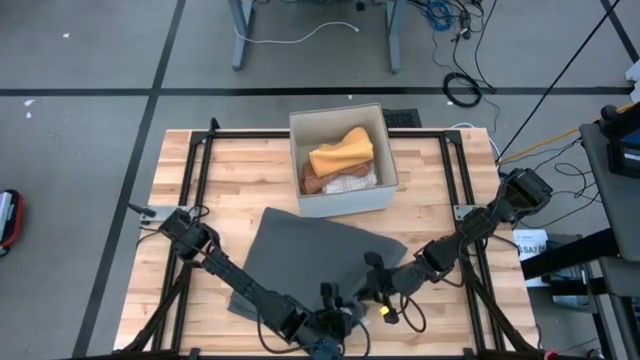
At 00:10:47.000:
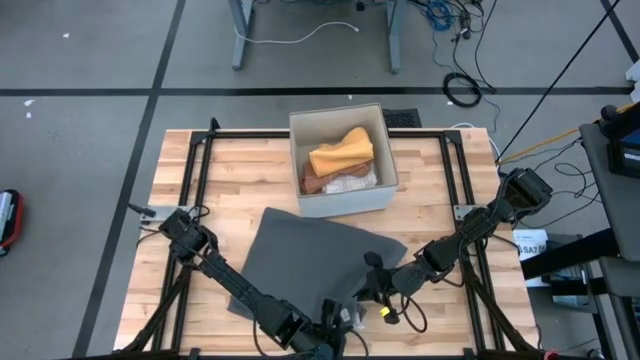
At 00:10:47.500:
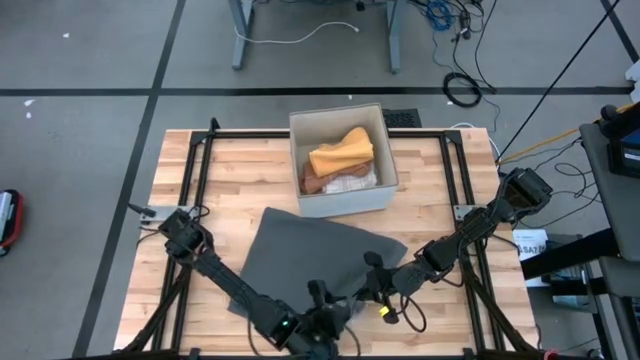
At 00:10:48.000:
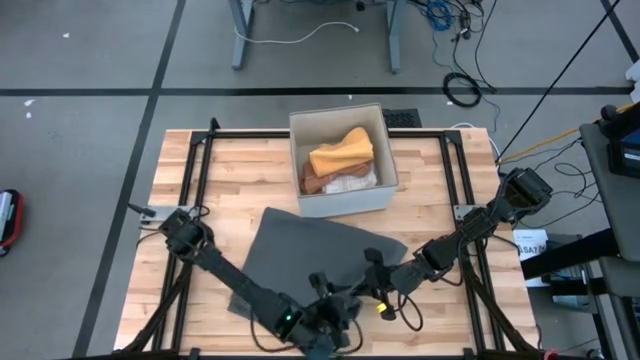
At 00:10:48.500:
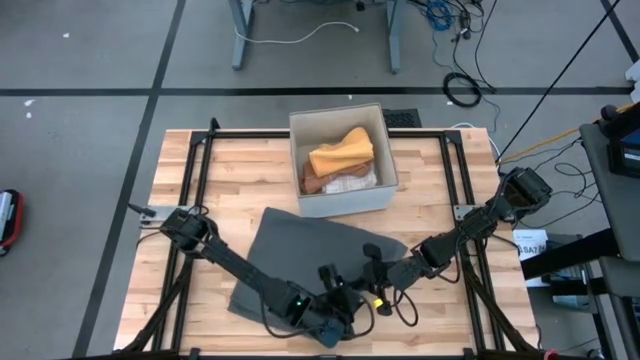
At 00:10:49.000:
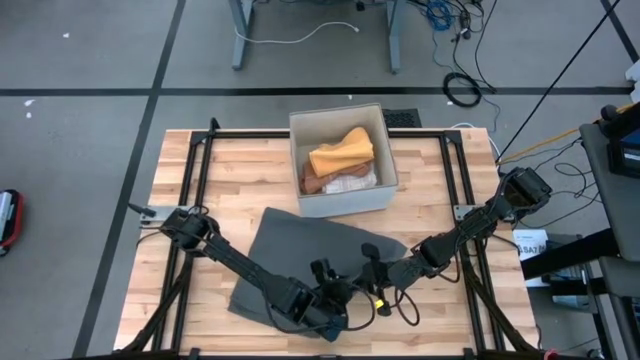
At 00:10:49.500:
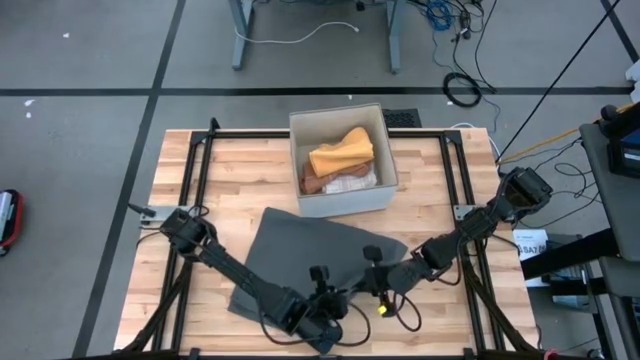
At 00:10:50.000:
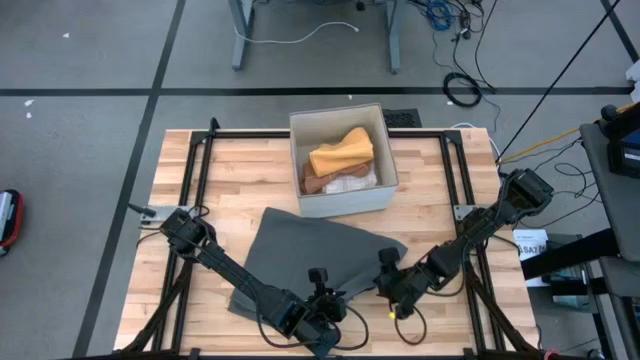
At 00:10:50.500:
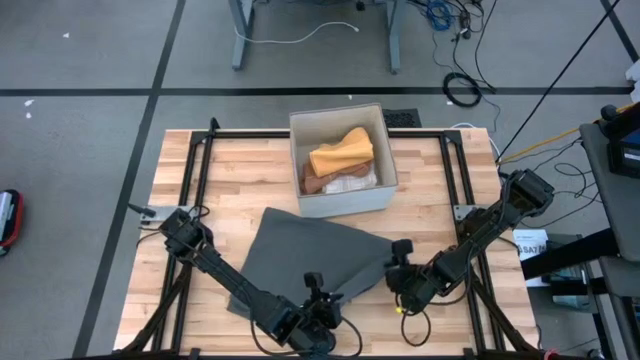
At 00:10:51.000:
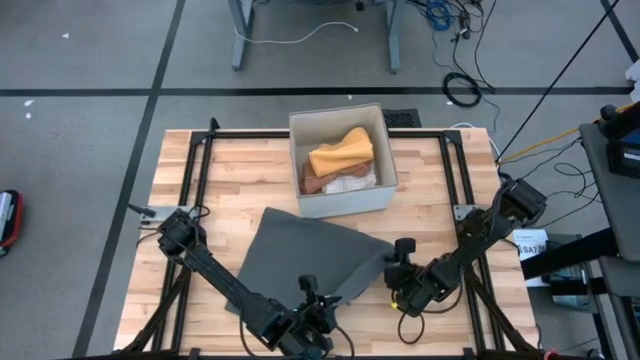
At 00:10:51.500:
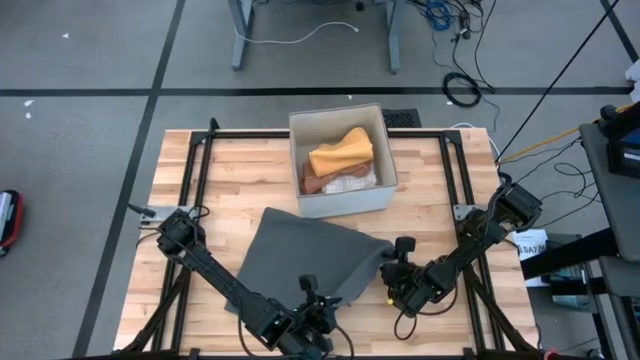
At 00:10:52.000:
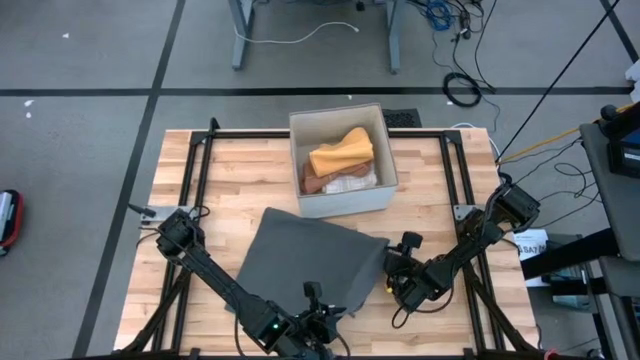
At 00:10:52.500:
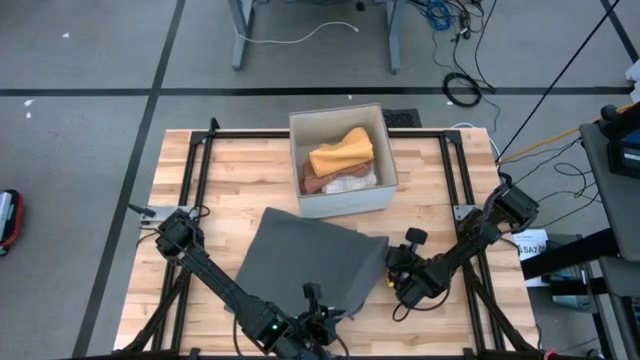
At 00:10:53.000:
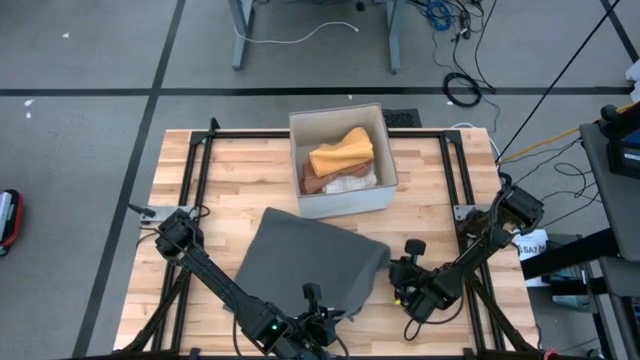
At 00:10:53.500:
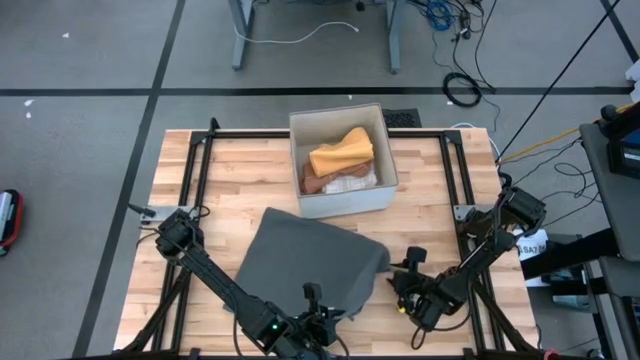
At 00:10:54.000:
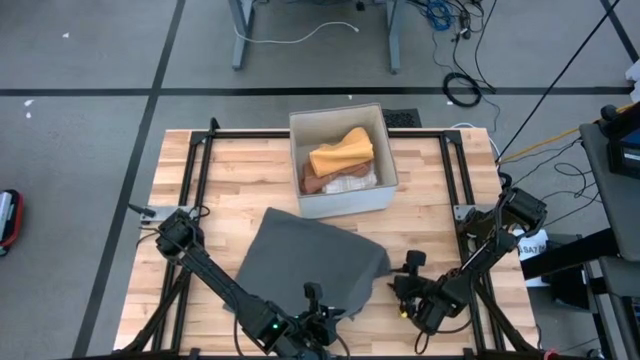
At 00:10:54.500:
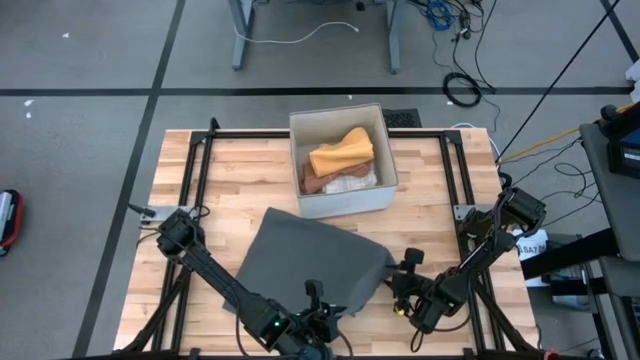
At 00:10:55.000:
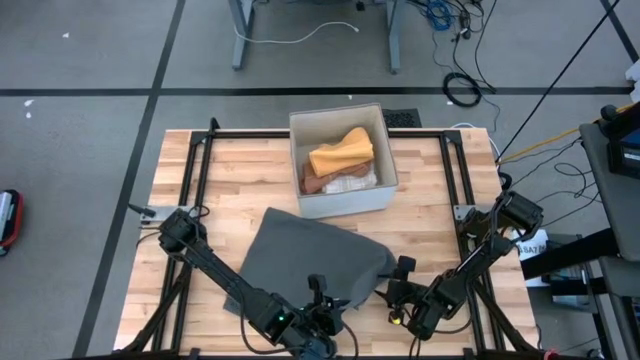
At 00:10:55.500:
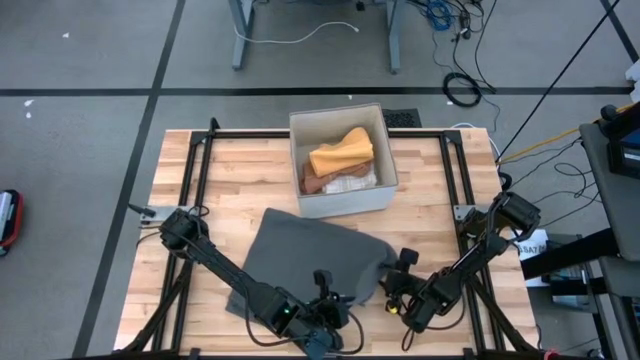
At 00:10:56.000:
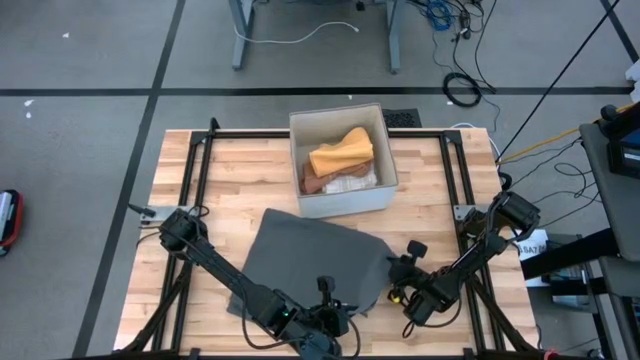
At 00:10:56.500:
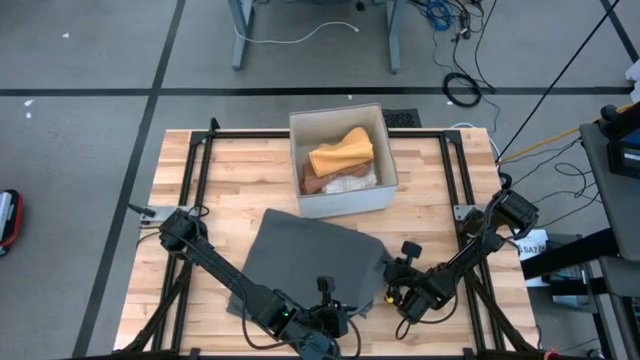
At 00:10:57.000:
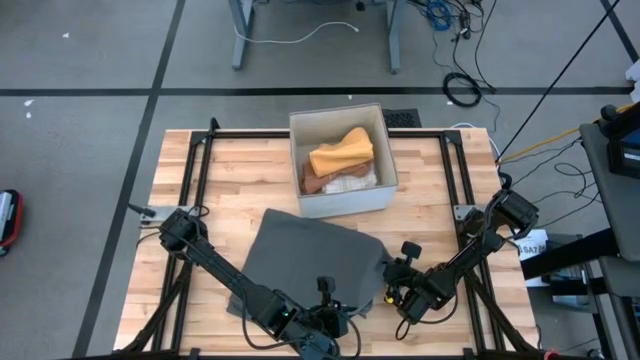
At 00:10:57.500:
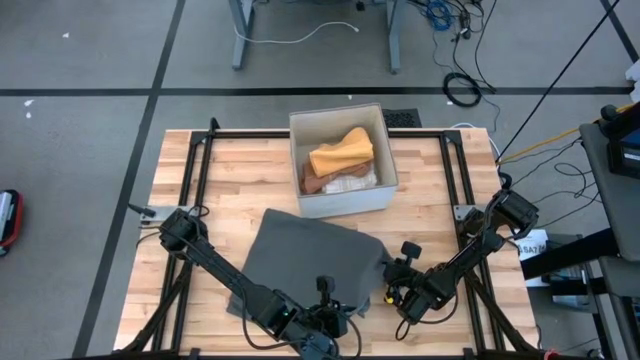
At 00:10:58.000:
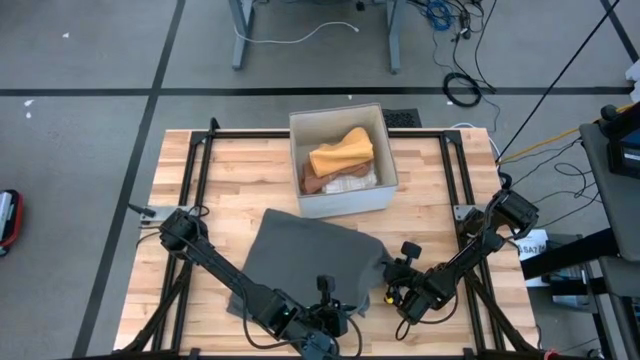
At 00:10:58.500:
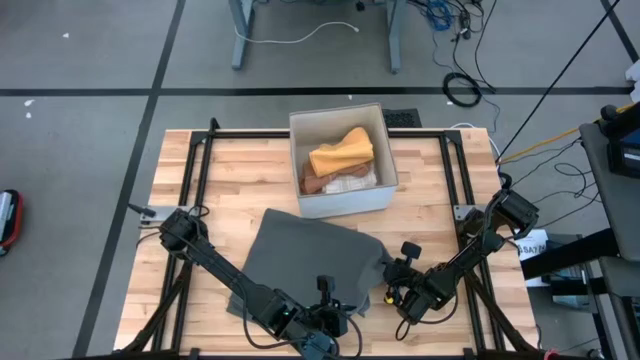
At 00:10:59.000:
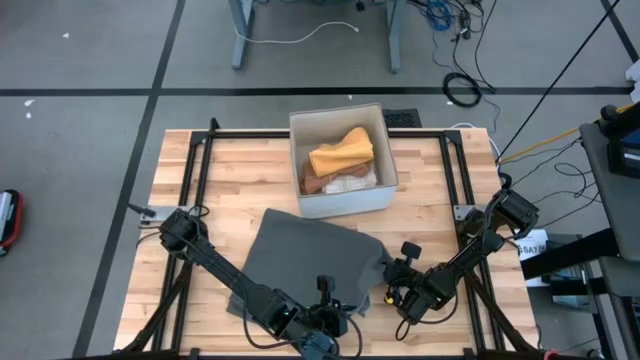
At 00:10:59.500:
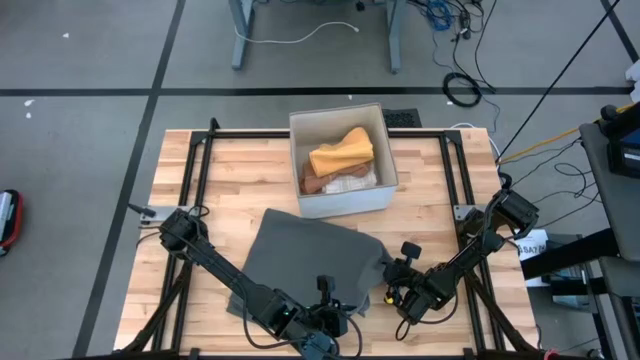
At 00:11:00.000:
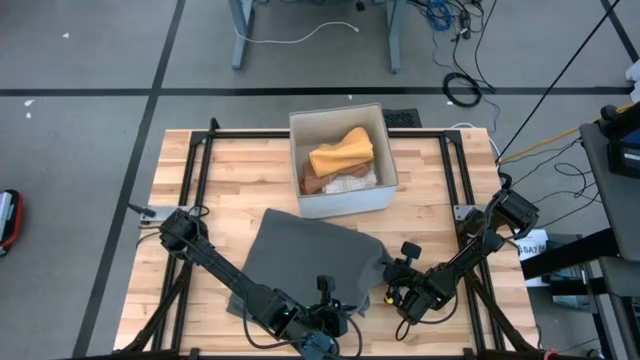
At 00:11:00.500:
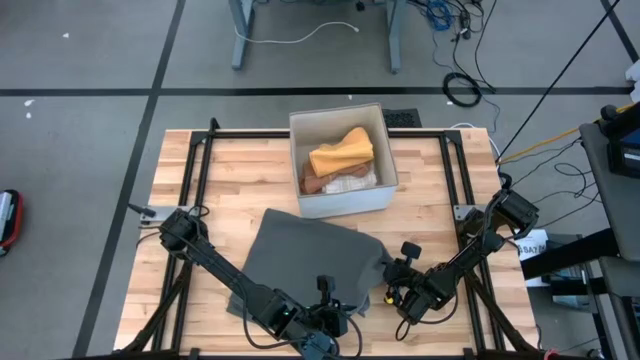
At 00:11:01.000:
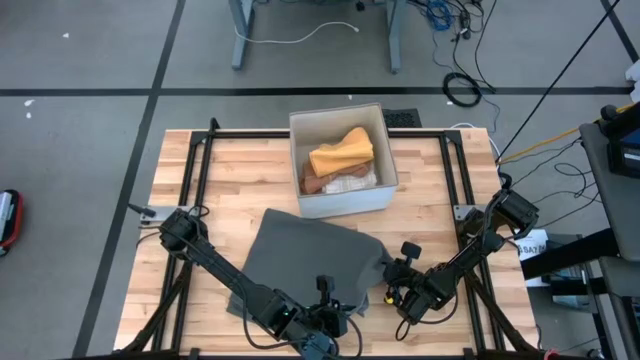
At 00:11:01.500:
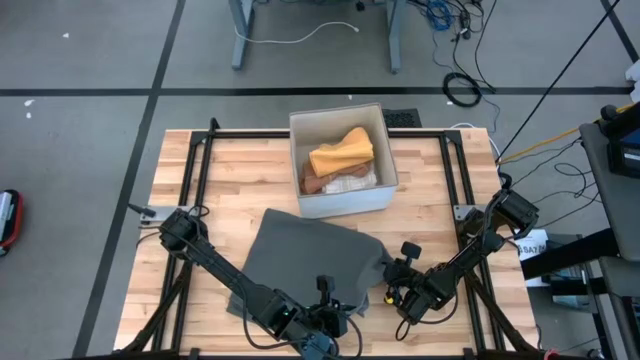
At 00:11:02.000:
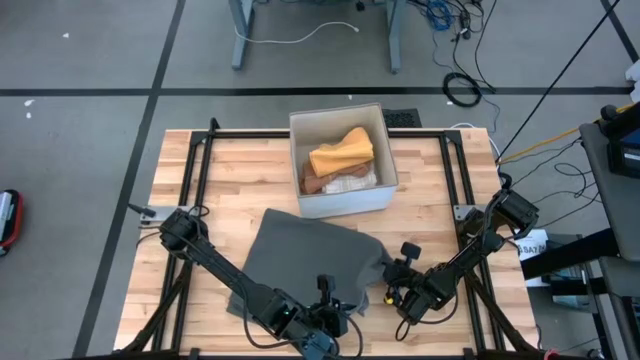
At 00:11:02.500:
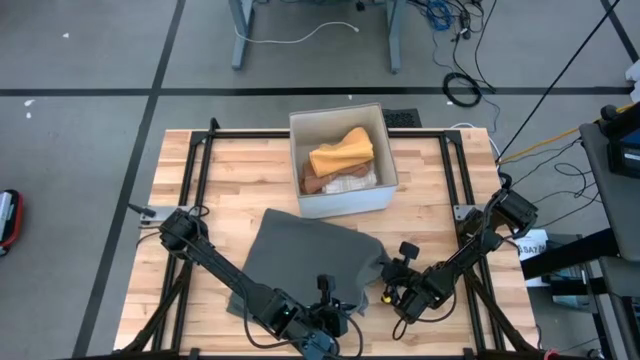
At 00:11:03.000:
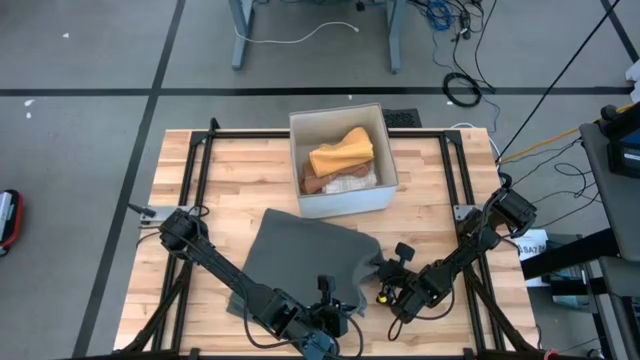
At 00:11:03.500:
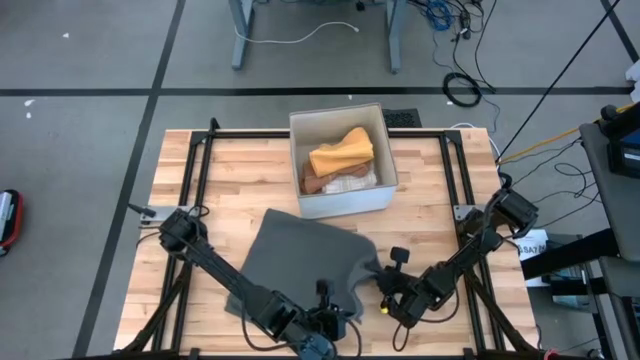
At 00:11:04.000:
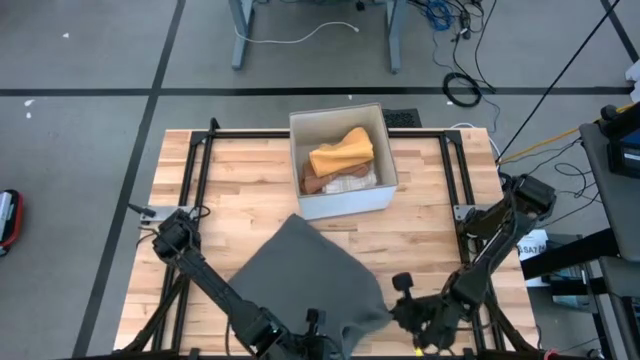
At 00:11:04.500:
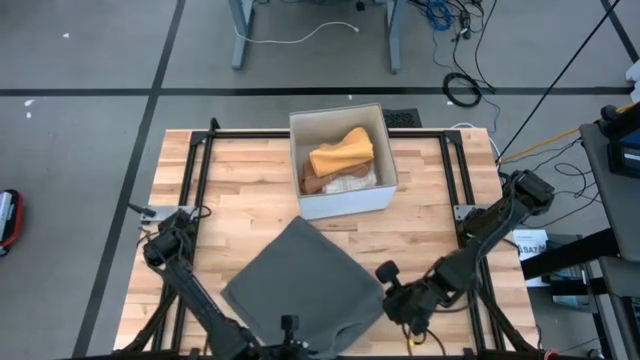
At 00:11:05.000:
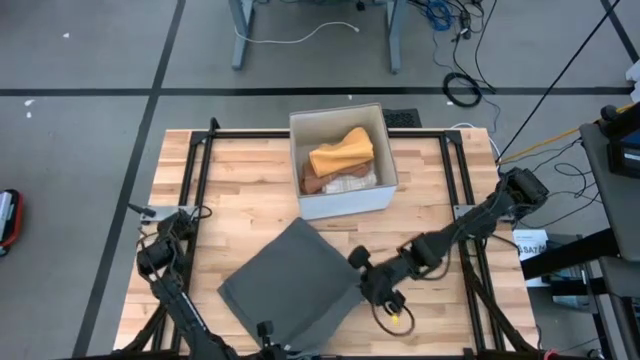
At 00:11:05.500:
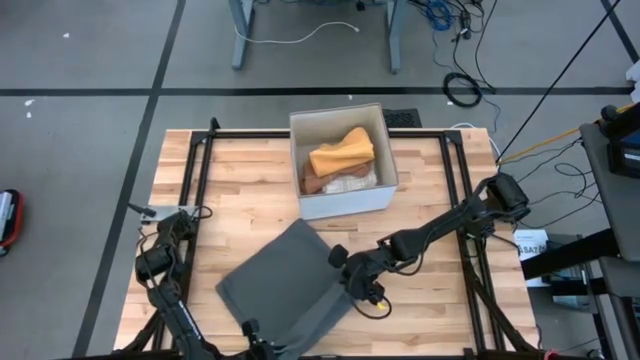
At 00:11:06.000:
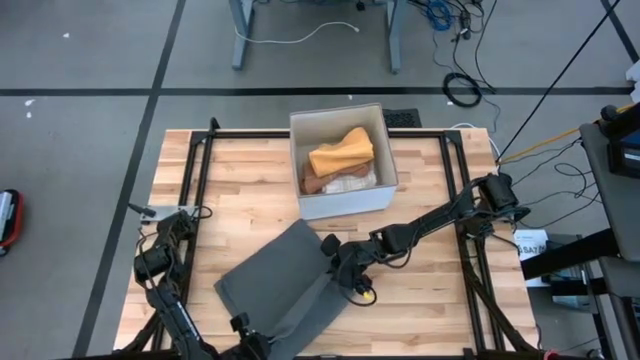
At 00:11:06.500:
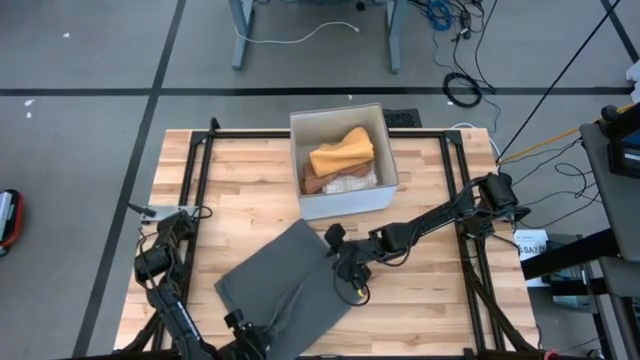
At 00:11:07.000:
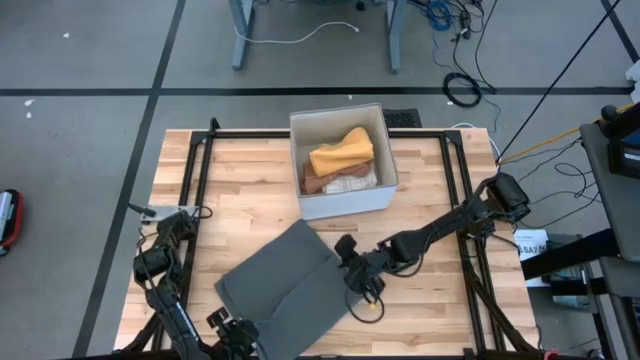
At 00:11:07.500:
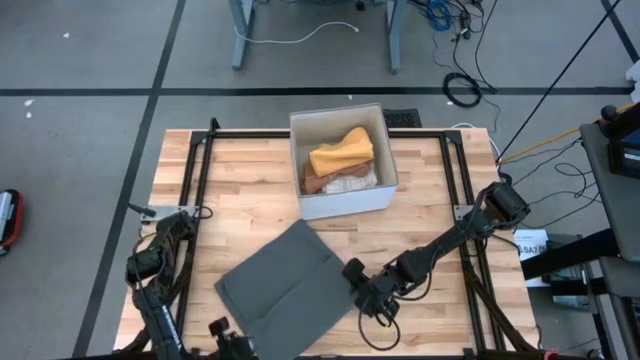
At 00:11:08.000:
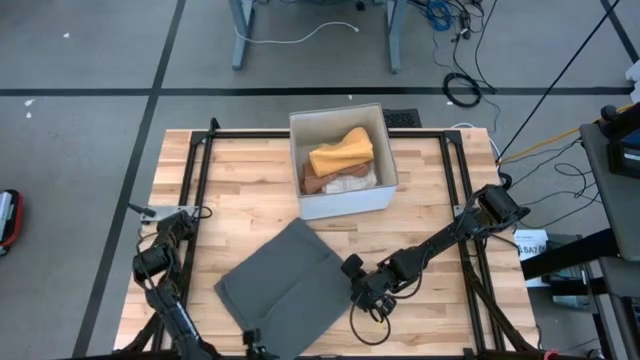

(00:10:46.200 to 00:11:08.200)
Task: Fold towel
Fold the orange towel
